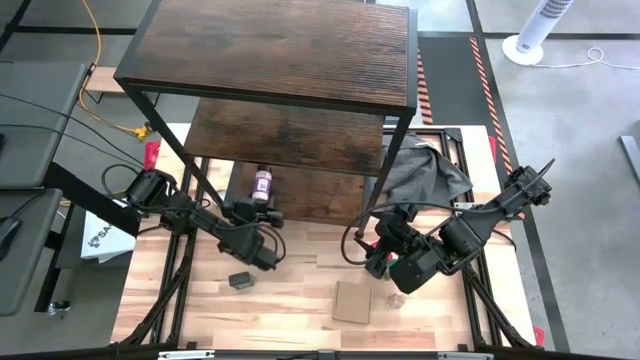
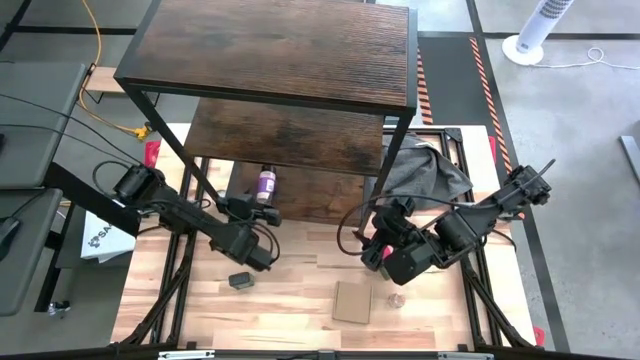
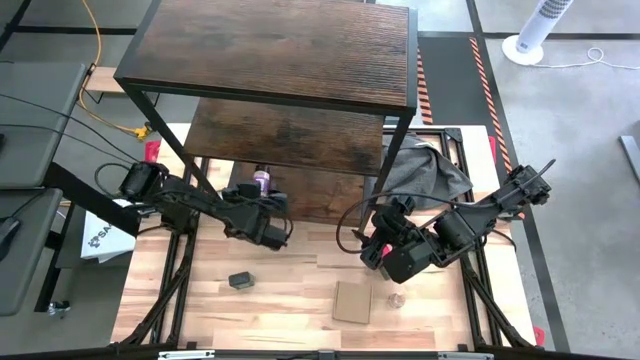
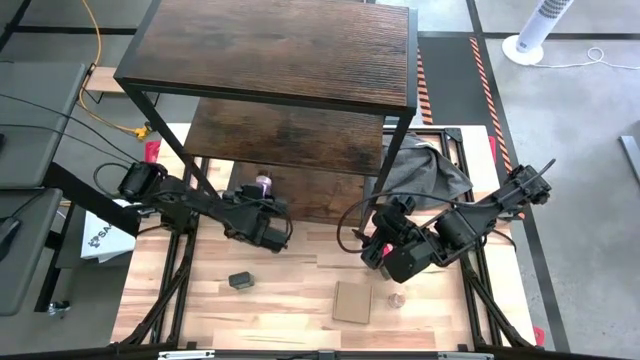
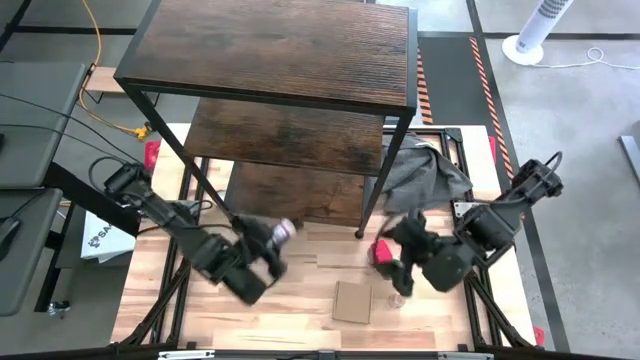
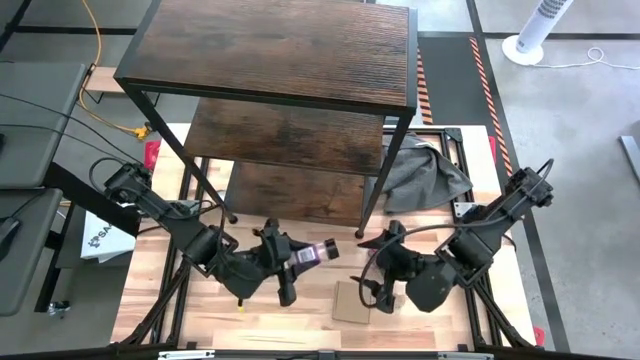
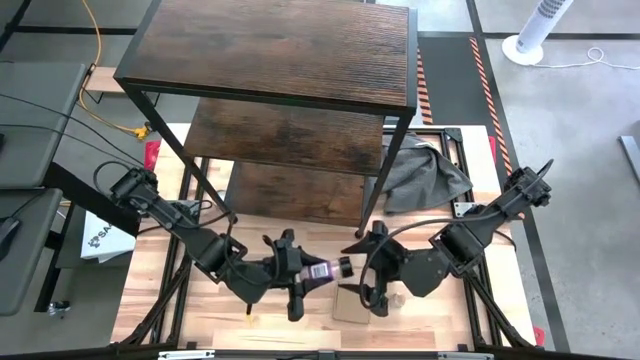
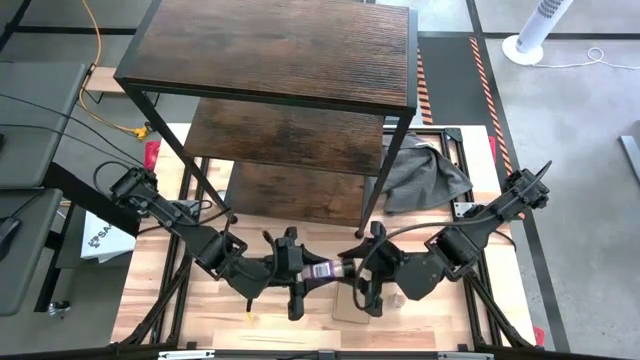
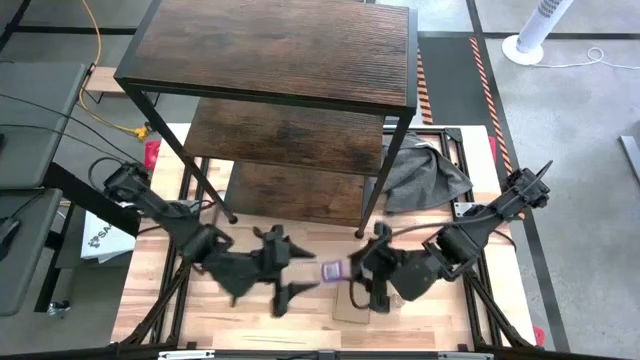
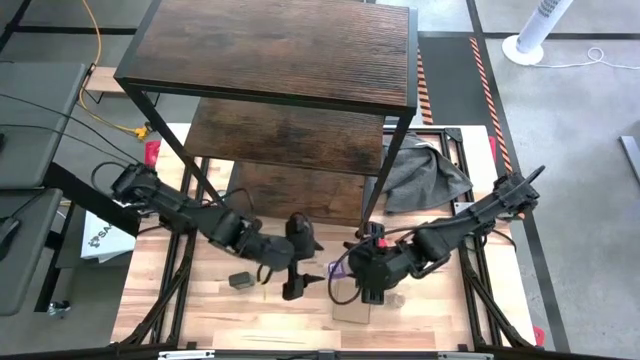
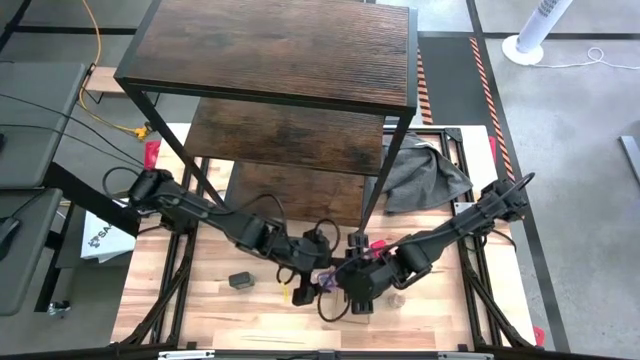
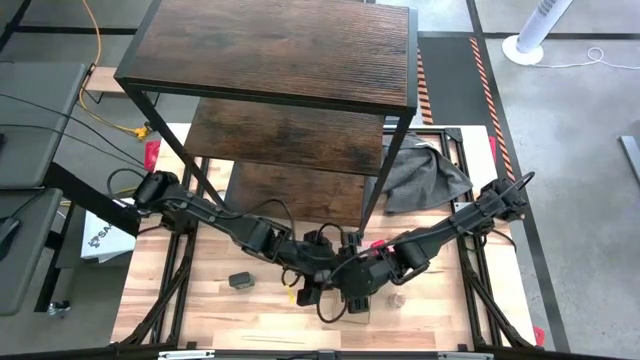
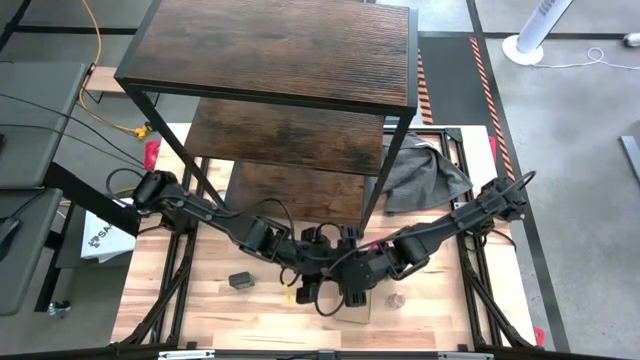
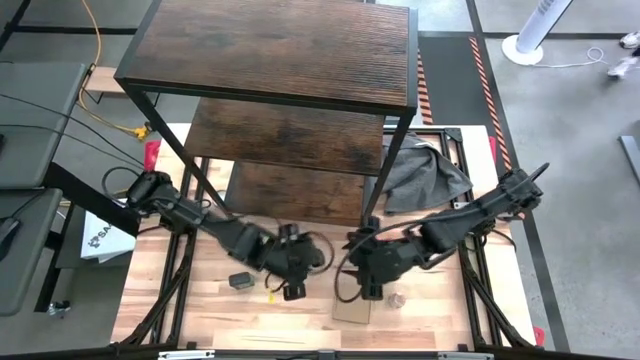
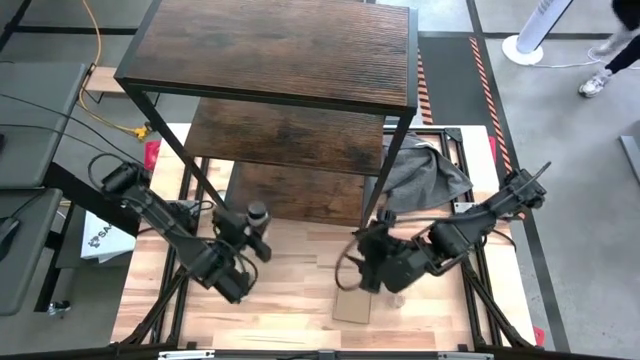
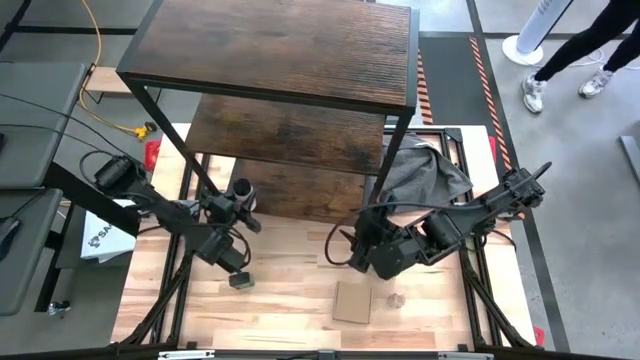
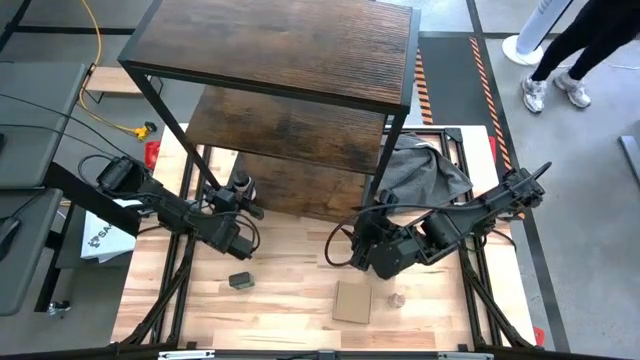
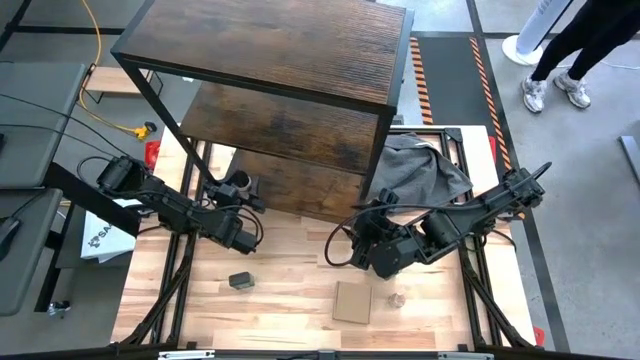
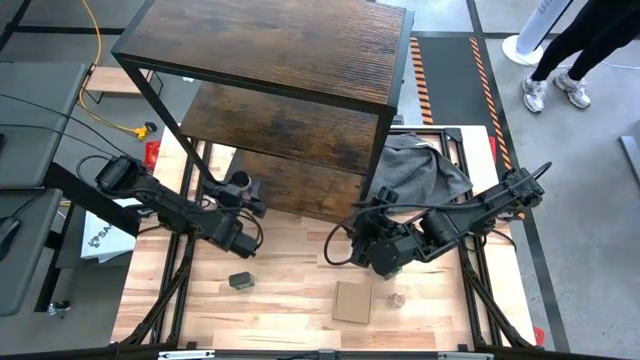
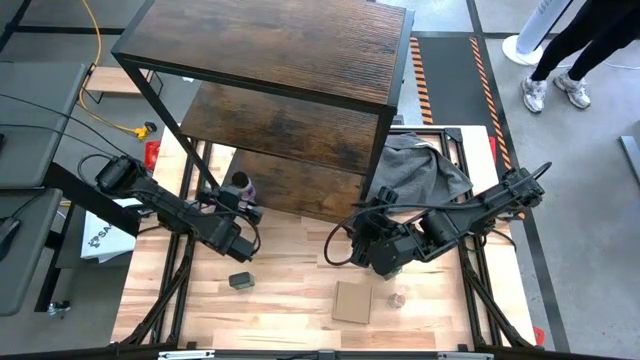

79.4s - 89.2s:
Task: Shelf spices
Put the black seasoning bottle on the shelf

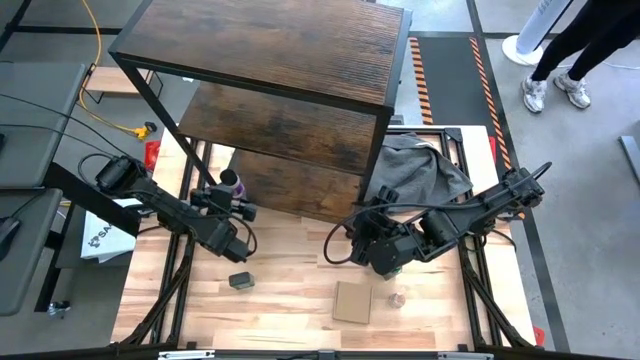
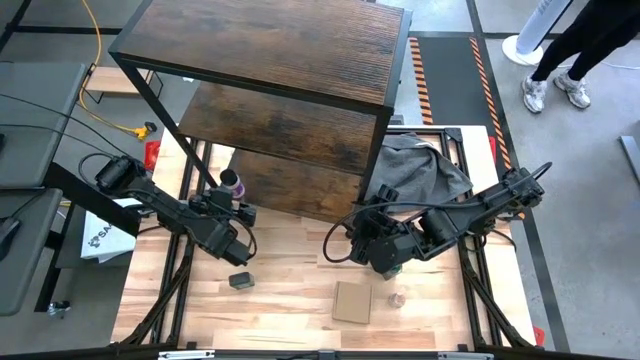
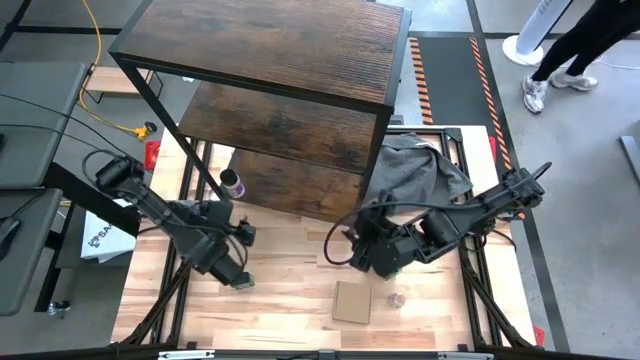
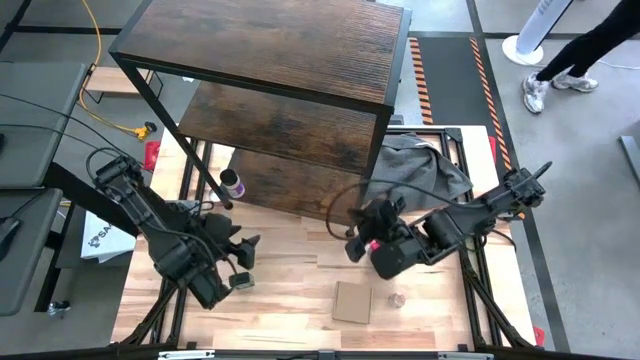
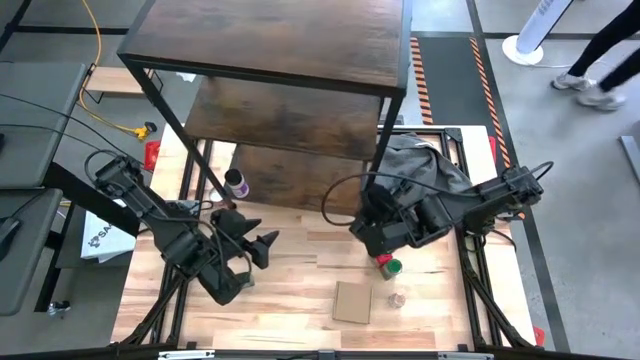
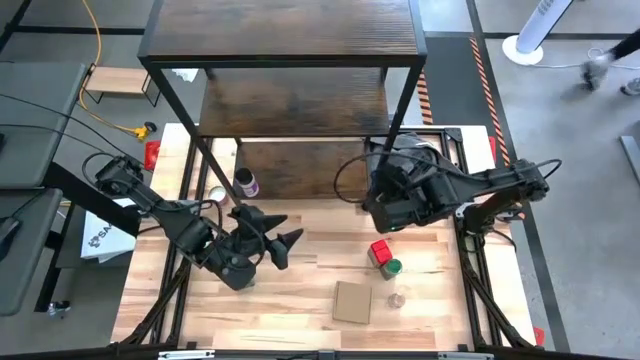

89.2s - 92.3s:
Adjust the shelf

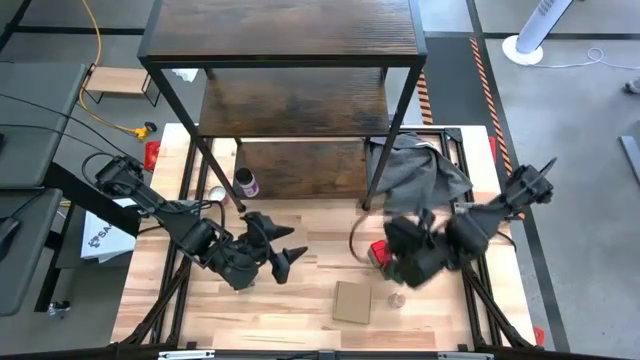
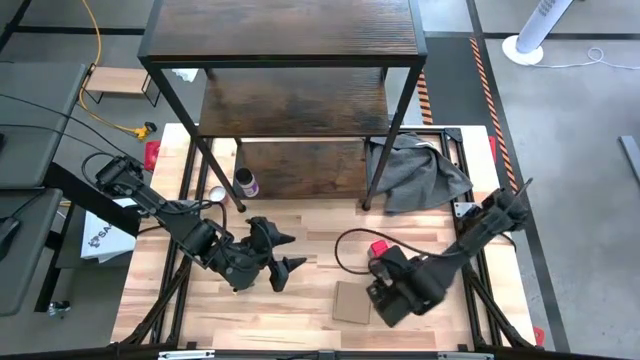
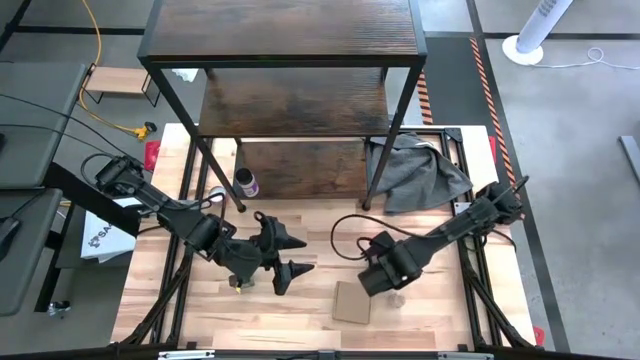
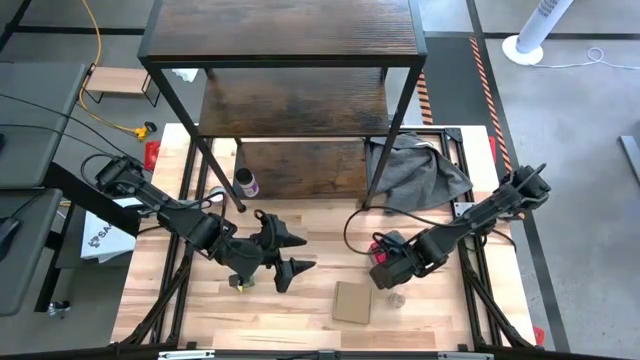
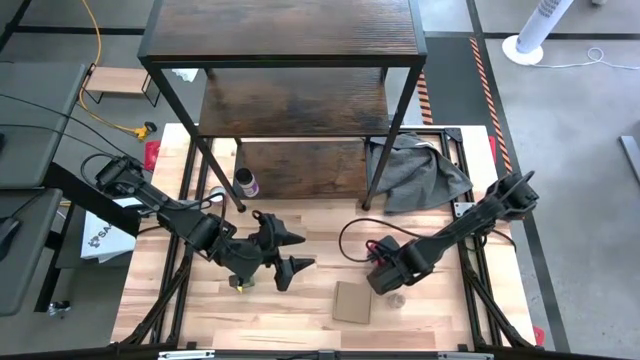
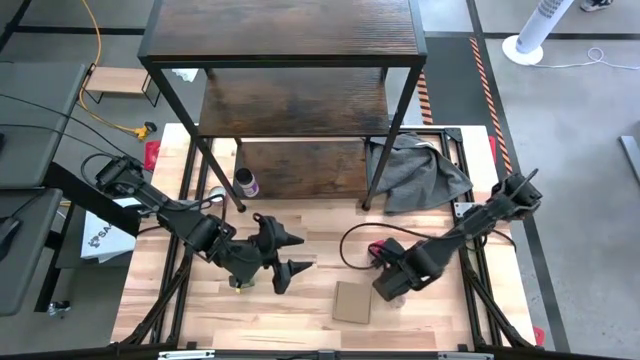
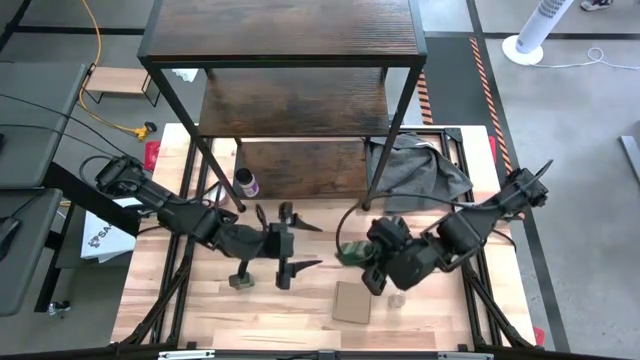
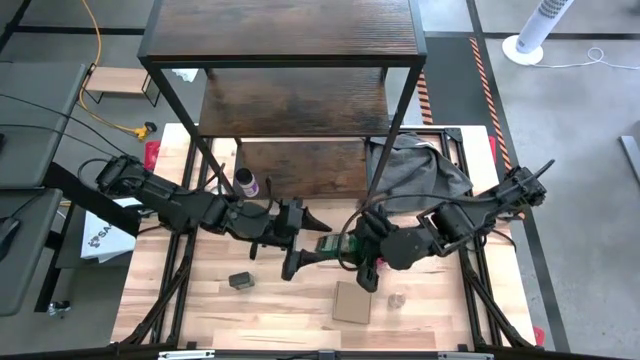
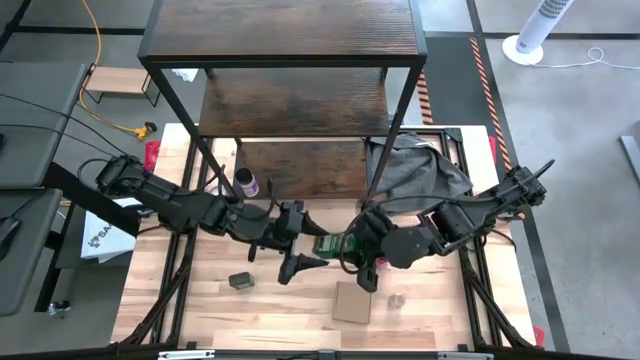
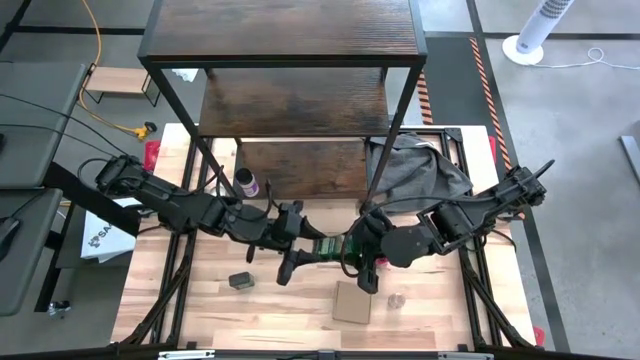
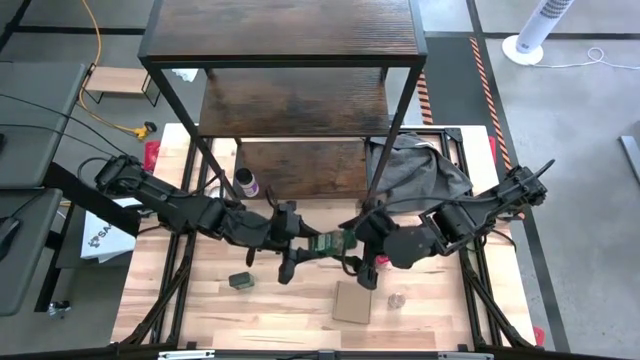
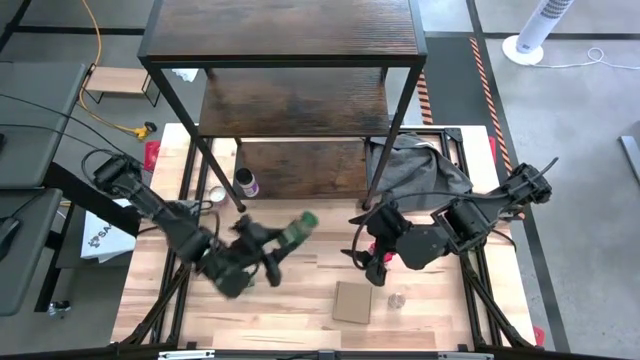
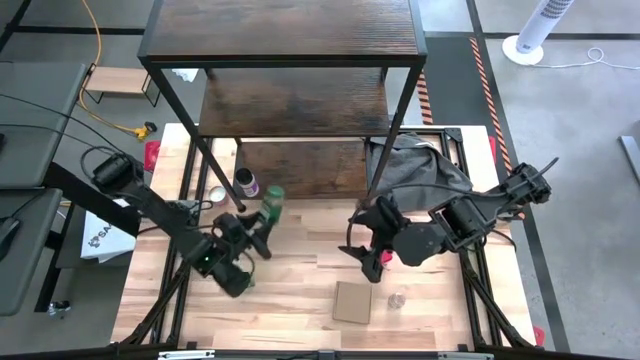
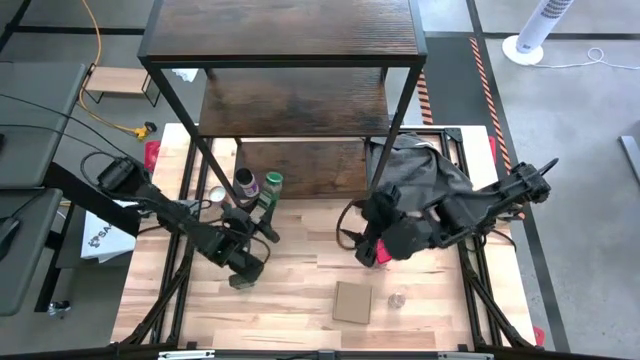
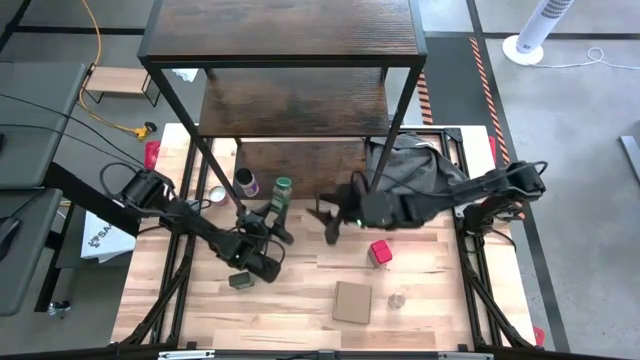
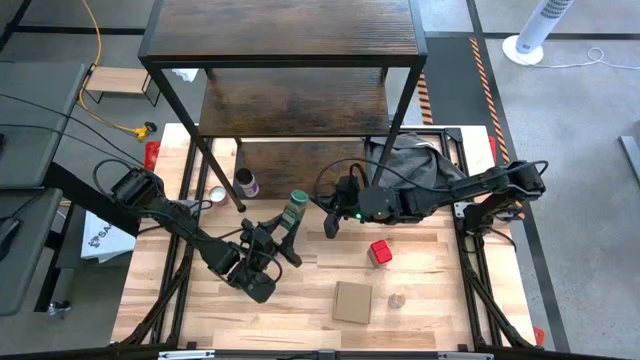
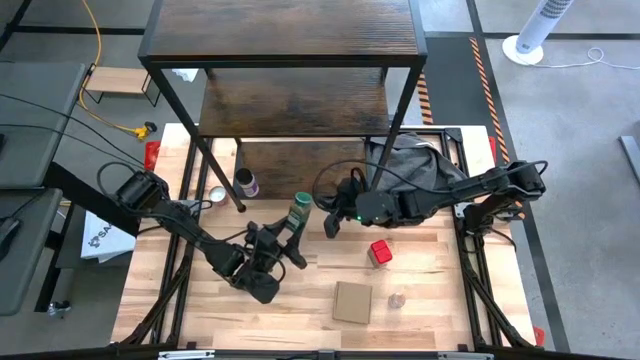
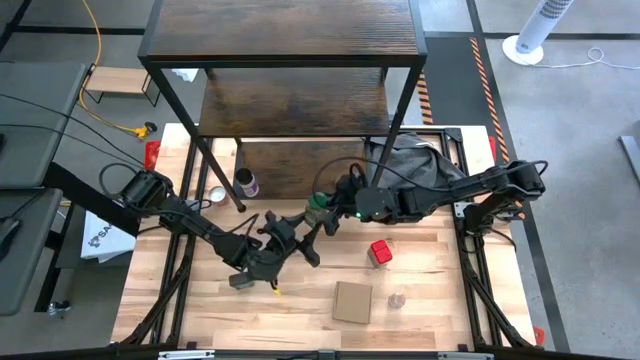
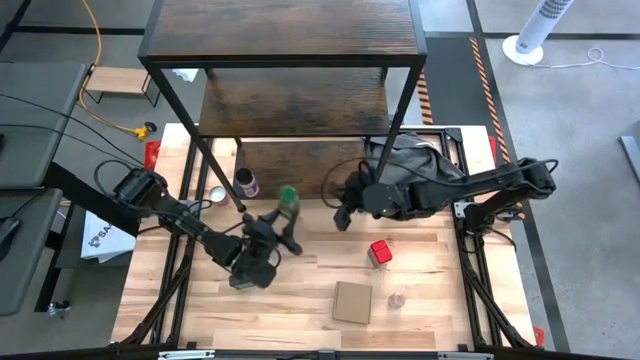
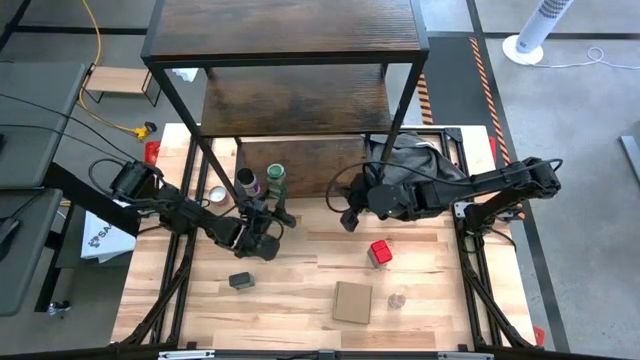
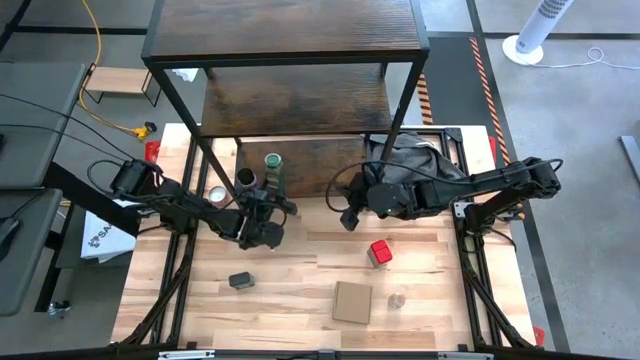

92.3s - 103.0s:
Put the green seasoning bottle on the shelf
